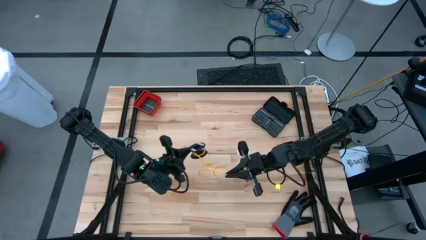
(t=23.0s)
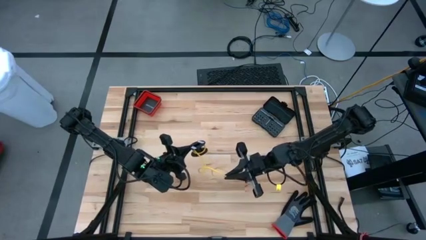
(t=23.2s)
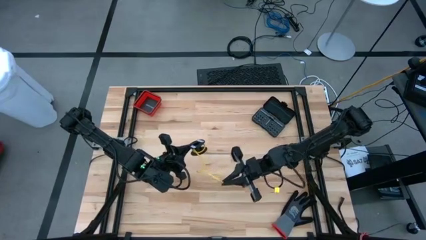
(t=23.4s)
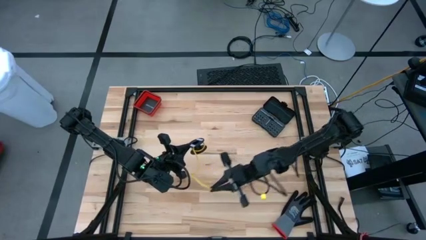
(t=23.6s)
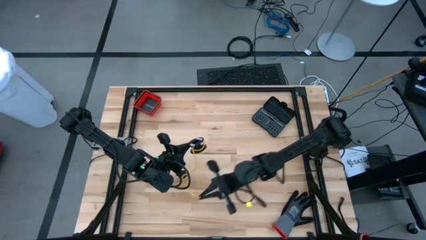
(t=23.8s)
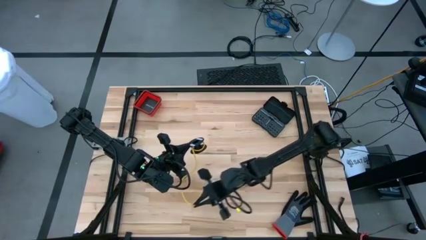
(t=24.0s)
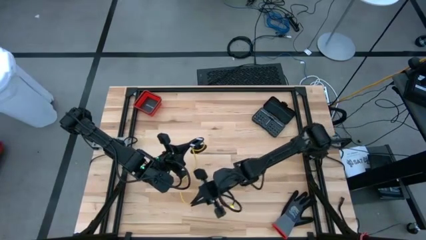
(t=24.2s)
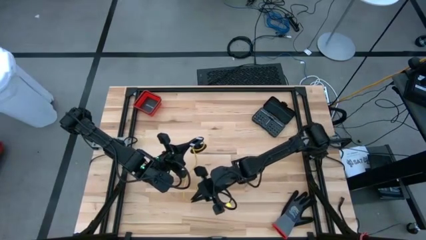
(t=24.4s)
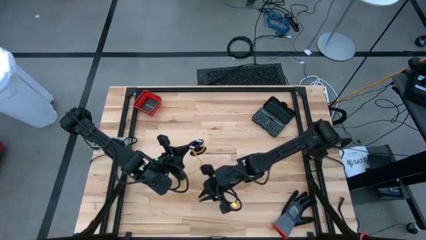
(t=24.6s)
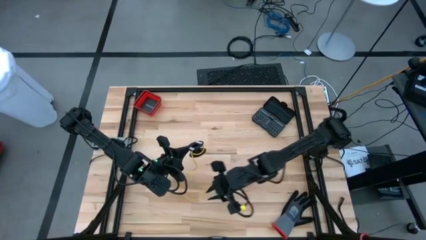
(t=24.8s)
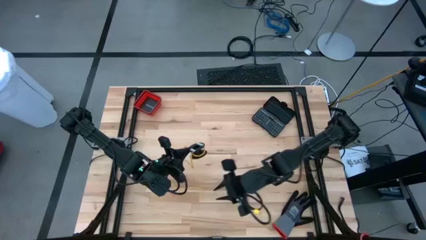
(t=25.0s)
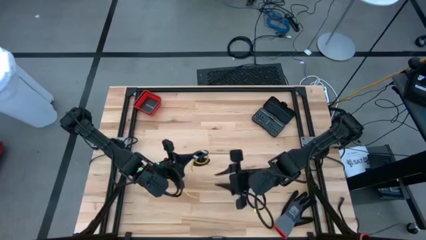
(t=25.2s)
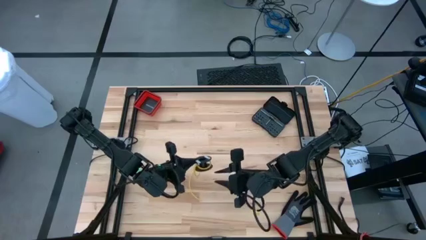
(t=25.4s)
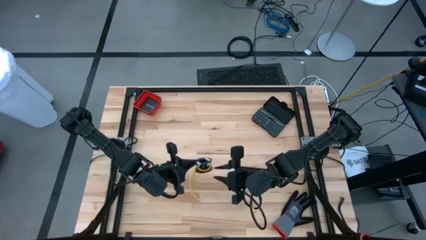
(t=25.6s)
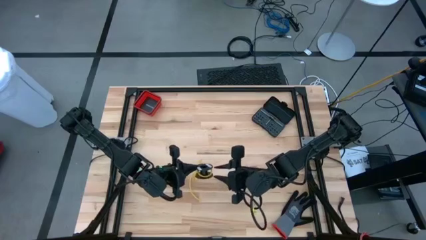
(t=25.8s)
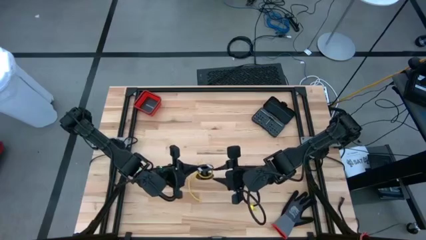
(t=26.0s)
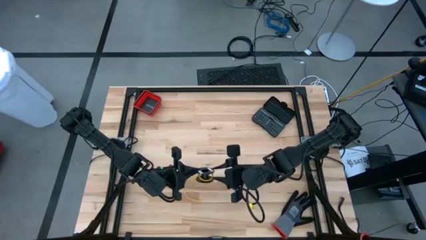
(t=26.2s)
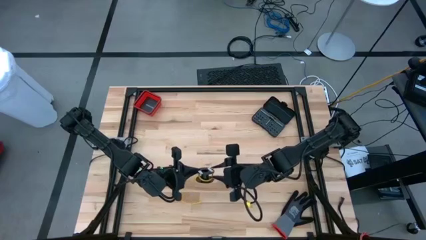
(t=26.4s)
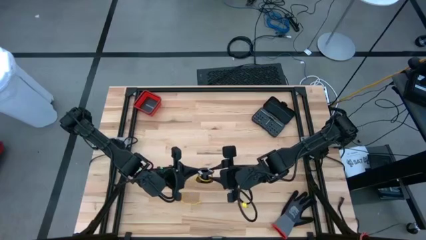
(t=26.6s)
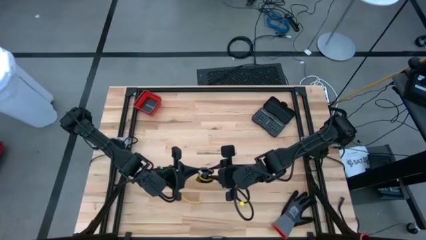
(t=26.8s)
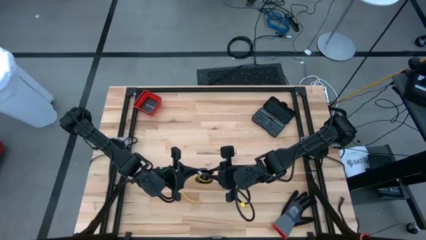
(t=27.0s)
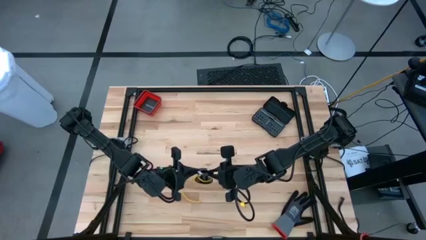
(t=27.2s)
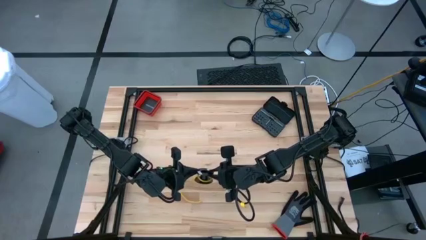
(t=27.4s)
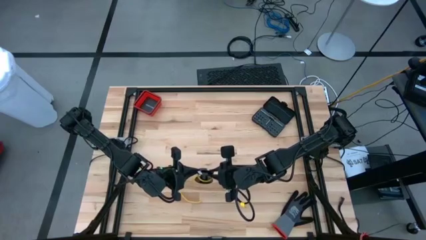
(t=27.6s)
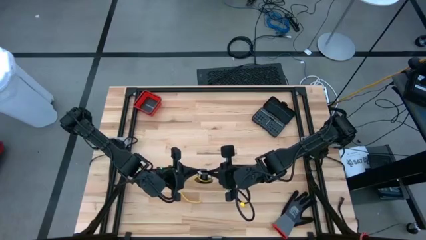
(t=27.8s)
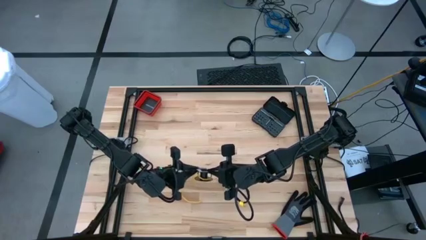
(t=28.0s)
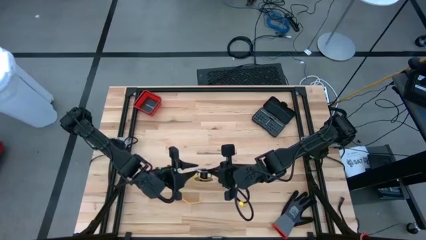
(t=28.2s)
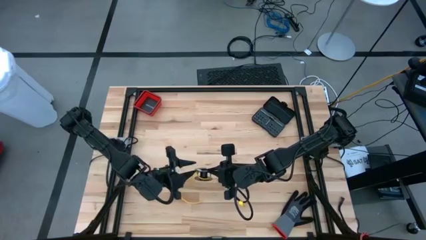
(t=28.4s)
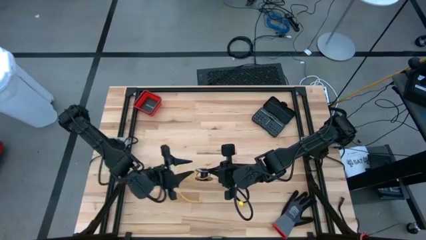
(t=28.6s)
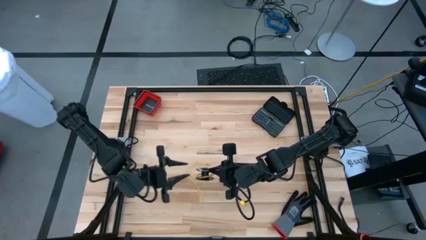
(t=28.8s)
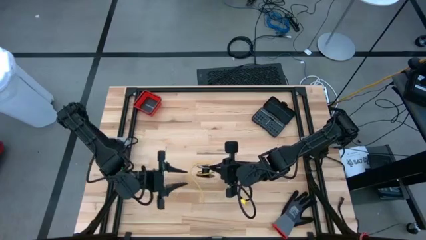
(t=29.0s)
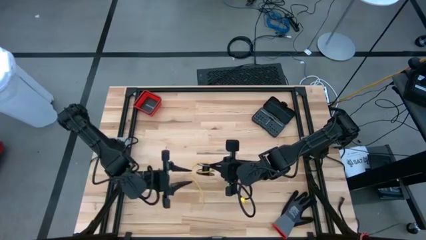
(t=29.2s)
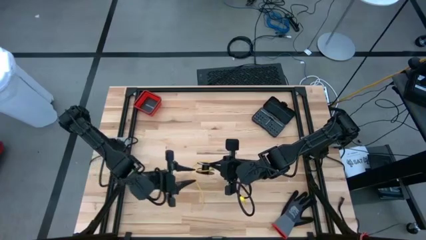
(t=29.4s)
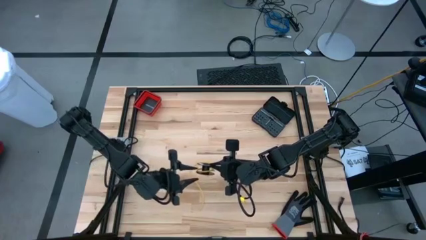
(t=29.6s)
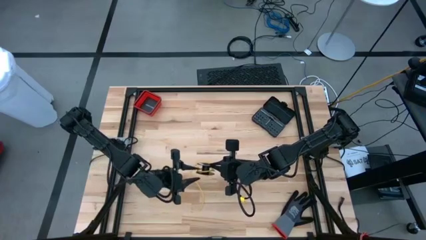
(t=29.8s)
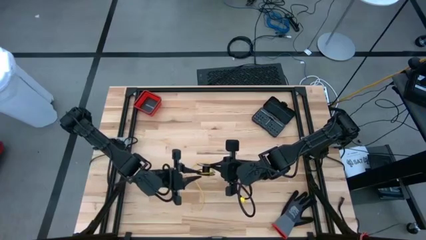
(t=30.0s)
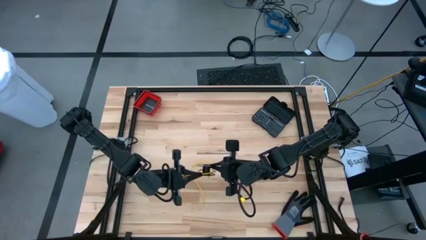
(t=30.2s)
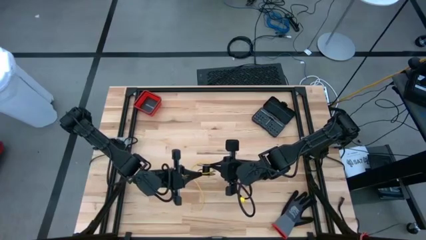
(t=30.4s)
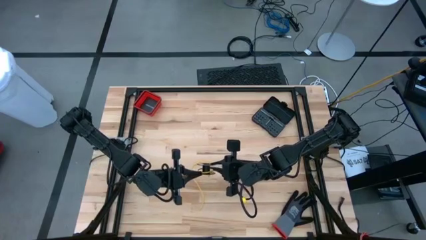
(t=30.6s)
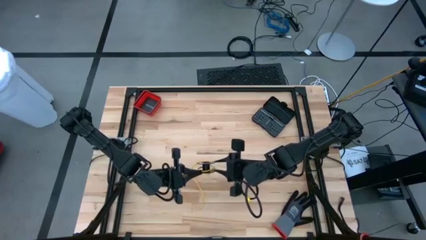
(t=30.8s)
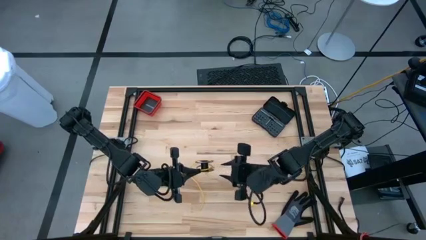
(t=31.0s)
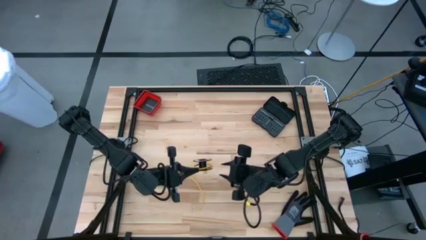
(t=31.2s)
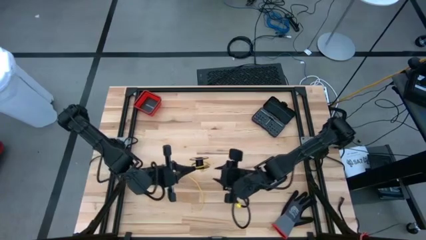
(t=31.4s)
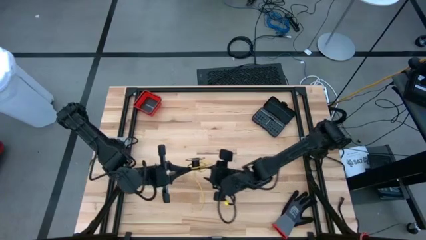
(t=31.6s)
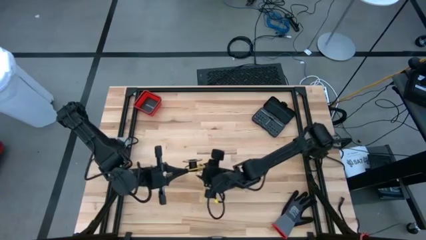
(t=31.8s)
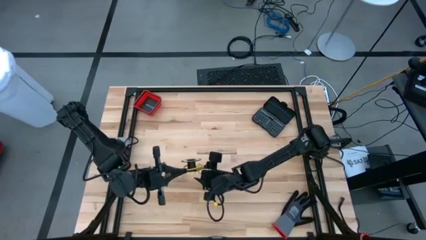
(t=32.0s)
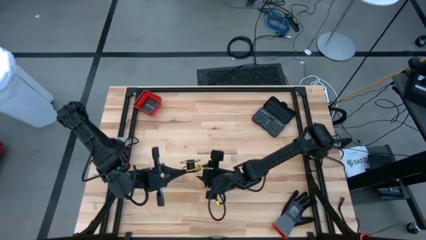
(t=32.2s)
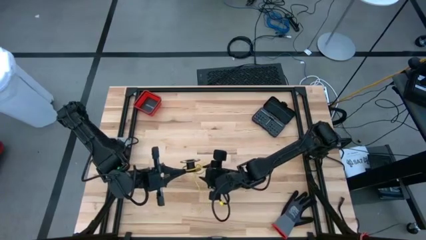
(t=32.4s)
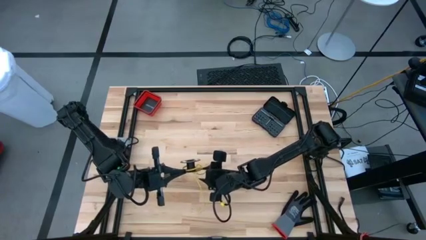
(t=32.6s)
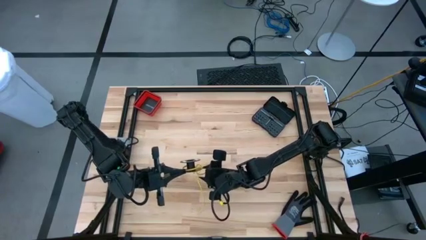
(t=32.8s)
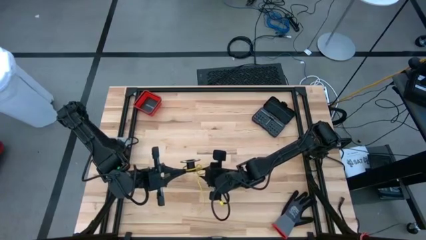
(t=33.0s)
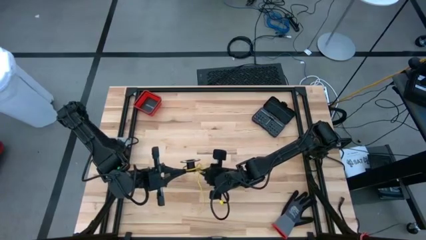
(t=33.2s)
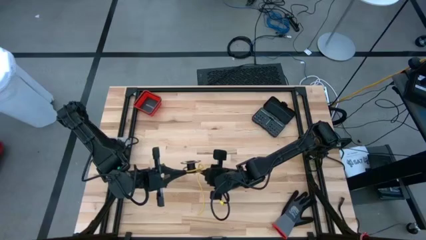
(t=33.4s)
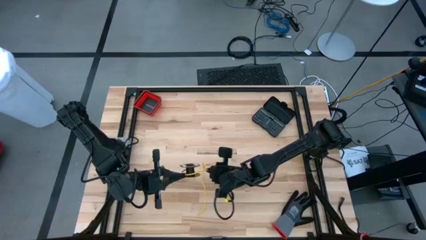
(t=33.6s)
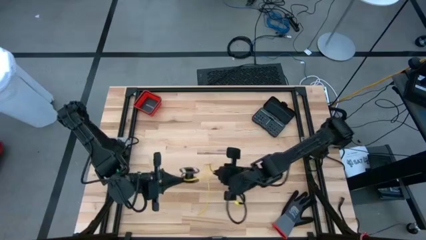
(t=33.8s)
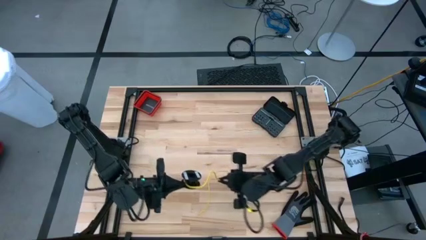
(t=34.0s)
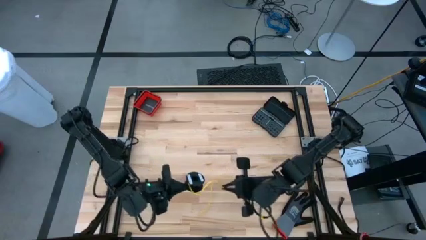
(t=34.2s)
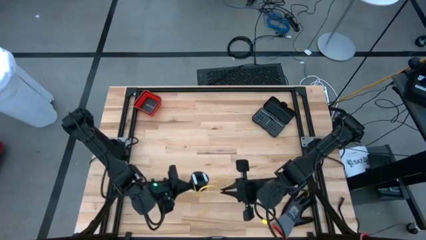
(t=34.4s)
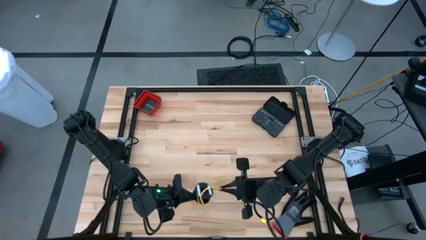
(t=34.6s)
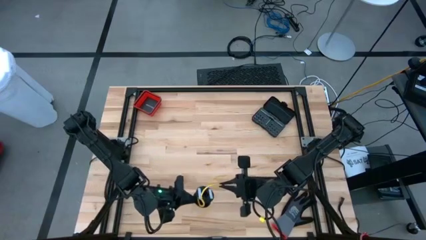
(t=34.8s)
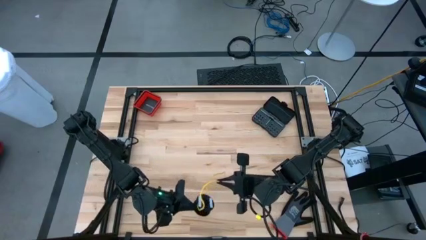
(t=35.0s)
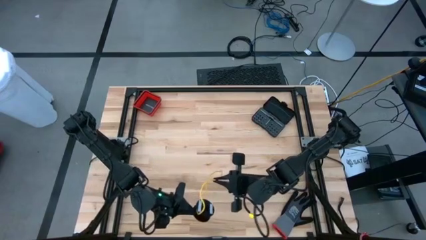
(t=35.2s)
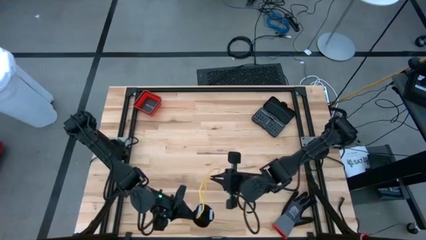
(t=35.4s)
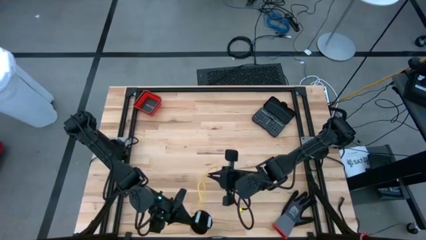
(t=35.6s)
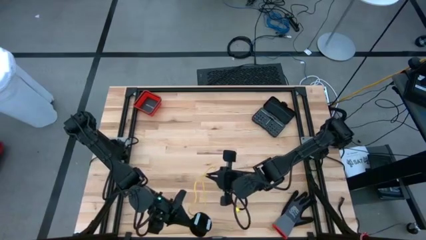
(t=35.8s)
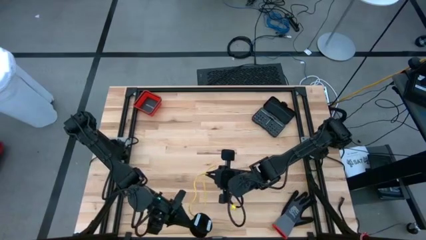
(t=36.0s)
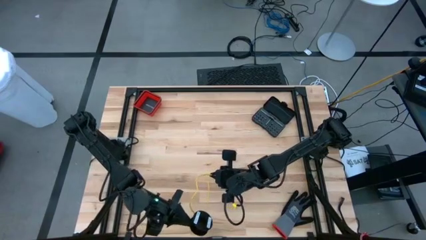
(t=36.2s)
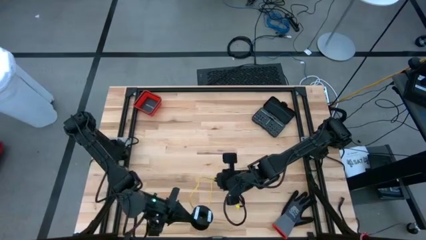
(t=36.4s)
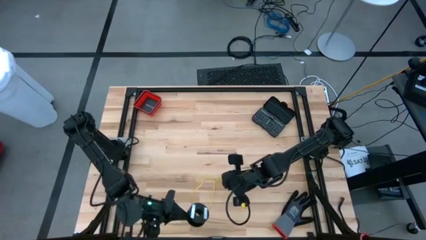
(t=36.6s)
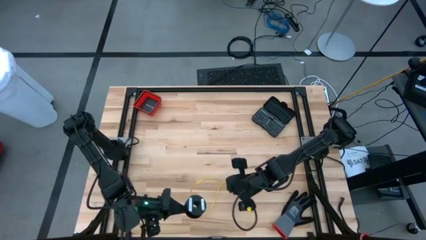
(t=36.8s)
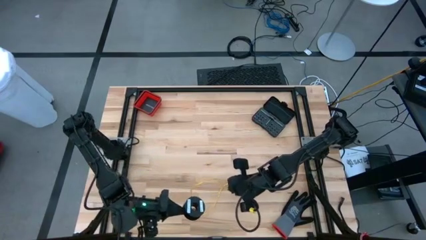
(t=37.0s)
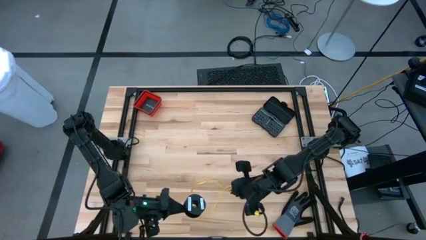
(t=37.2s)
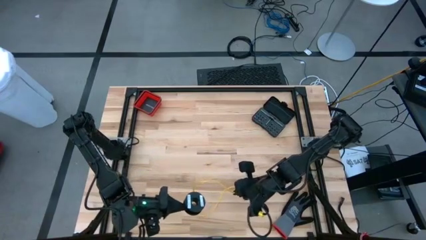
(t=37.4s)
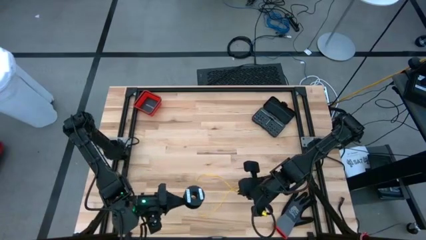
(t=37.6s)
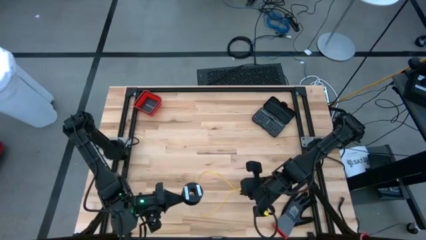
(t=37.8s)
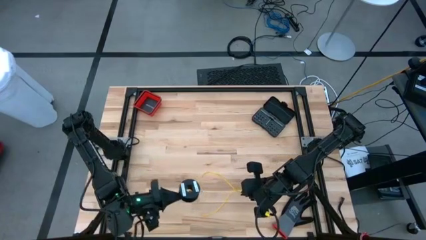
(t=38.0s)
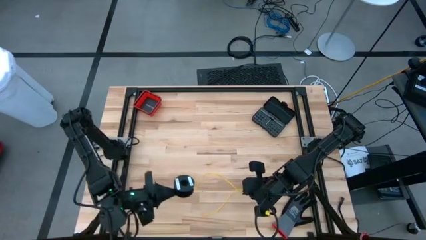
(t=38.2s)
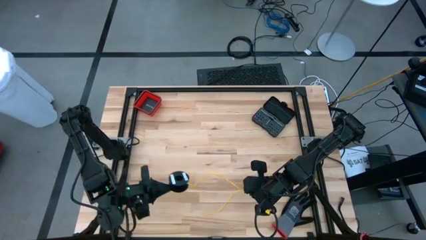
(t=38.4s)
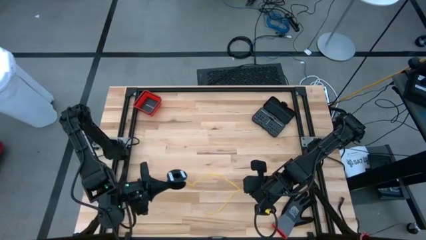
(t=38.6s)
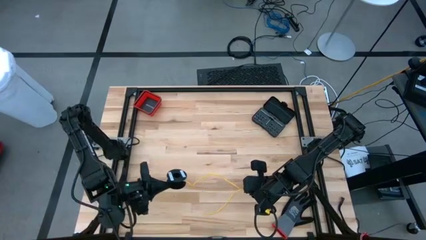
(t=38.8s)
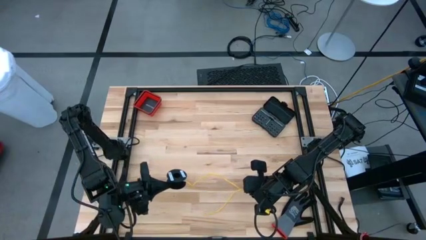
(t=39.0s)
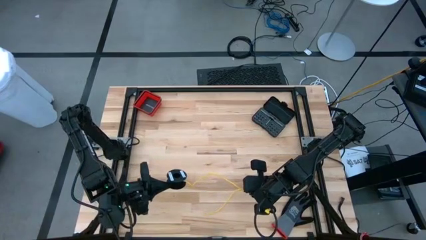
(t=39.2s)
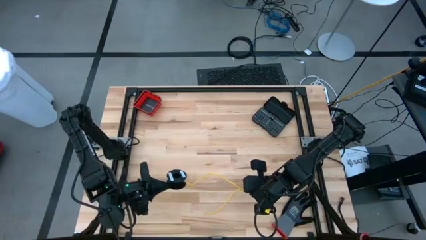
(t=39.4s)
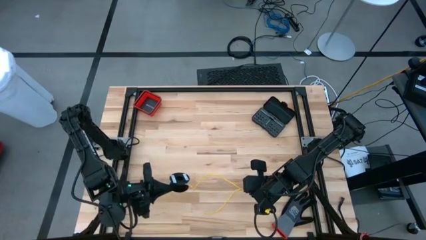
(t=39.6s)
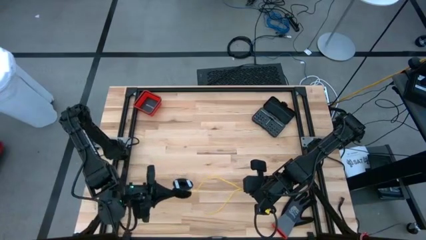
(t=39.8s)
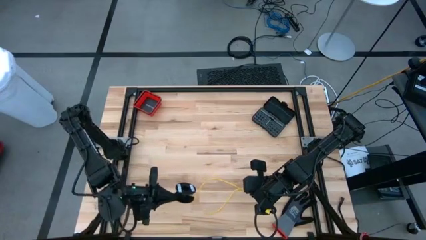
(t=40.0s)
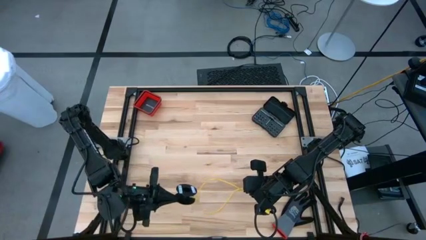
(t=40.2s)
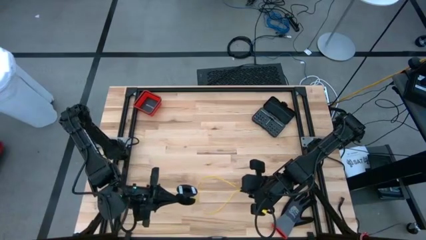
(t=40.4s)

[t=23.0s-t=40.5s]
Task: Coil cords
Uncoil the yellow cable wire from the spool
